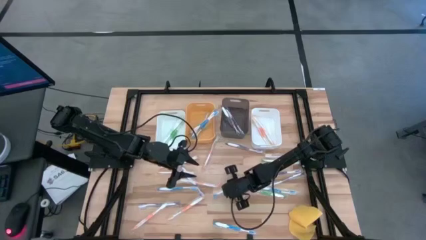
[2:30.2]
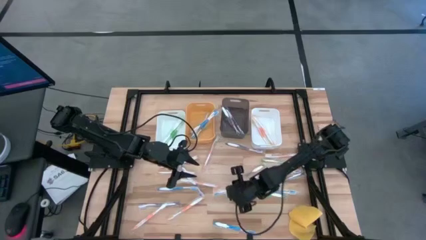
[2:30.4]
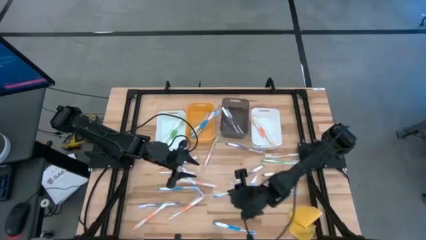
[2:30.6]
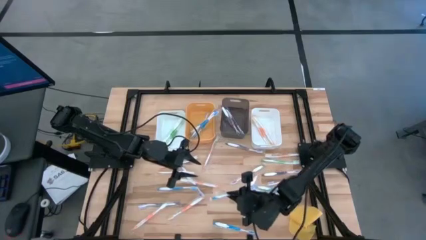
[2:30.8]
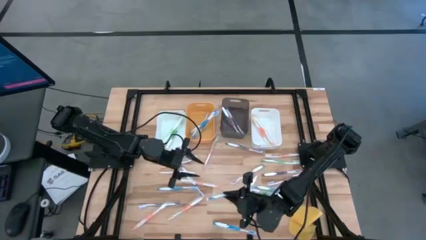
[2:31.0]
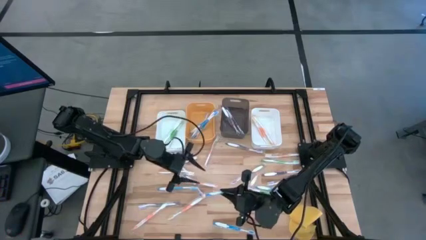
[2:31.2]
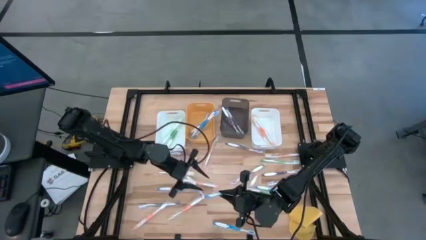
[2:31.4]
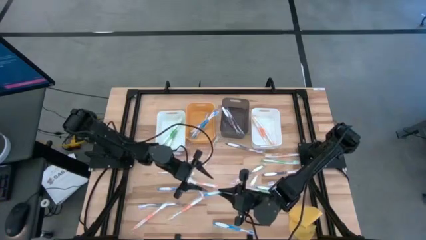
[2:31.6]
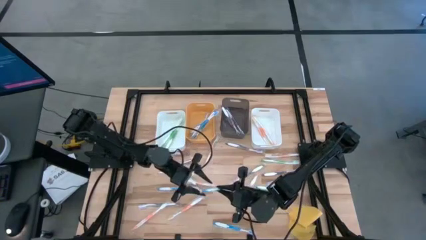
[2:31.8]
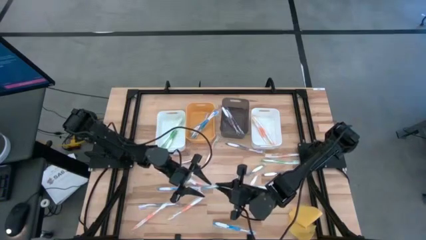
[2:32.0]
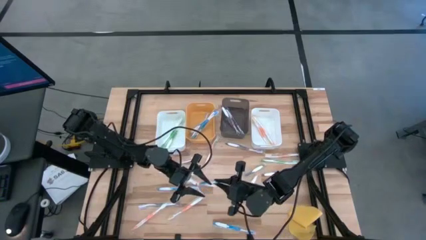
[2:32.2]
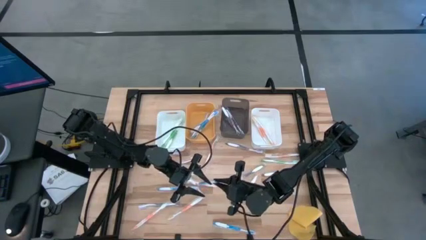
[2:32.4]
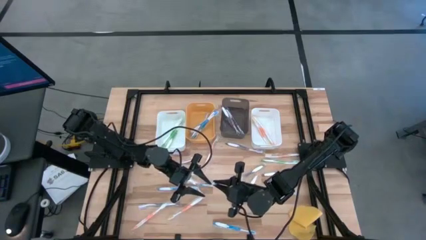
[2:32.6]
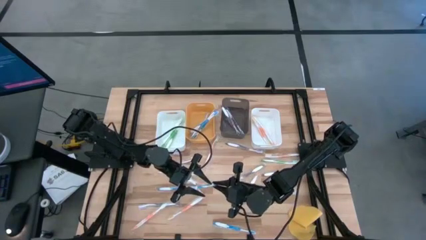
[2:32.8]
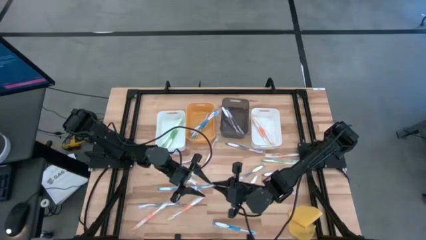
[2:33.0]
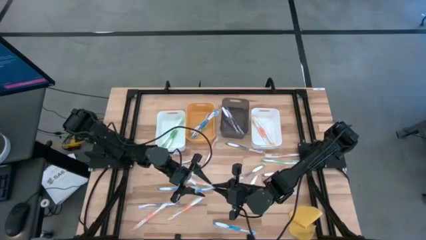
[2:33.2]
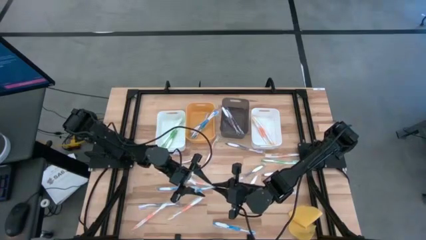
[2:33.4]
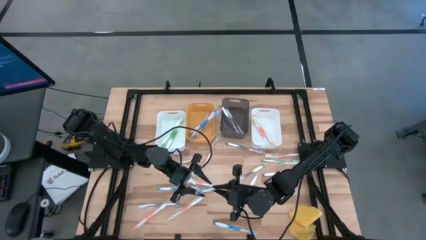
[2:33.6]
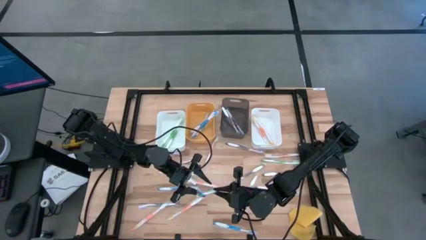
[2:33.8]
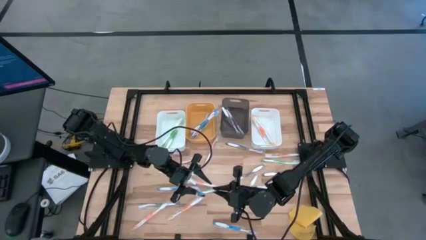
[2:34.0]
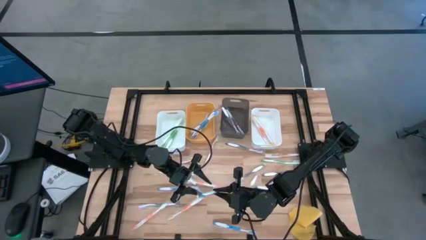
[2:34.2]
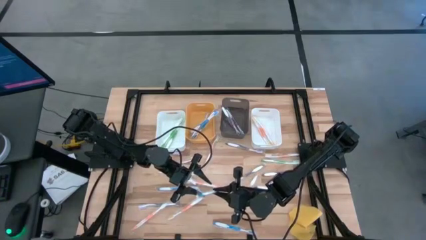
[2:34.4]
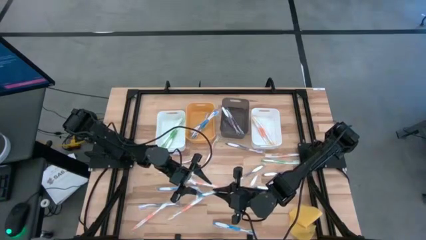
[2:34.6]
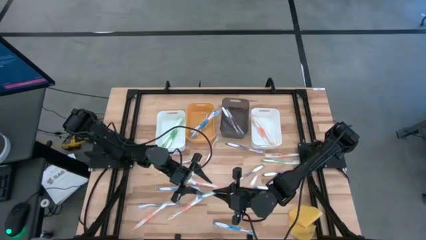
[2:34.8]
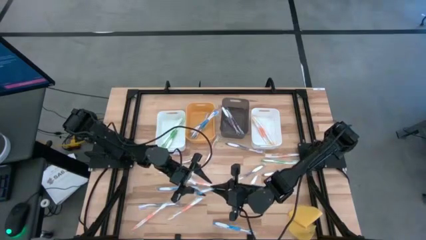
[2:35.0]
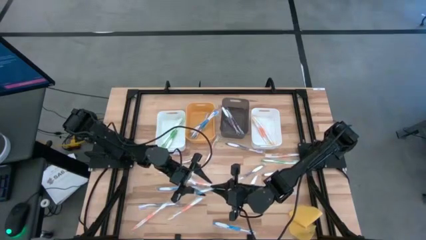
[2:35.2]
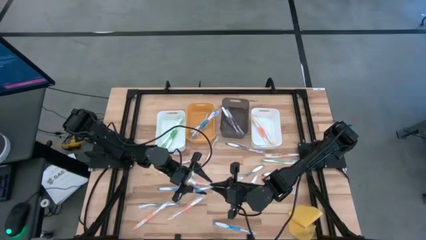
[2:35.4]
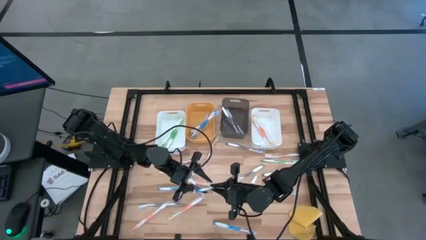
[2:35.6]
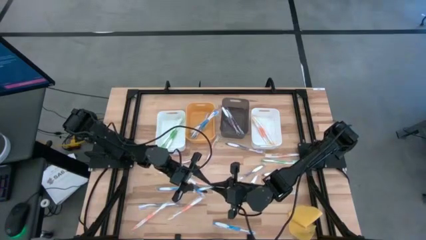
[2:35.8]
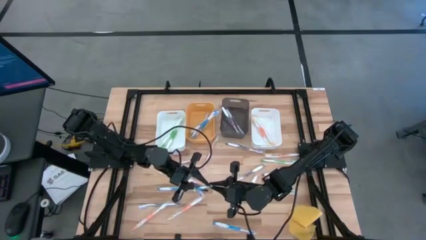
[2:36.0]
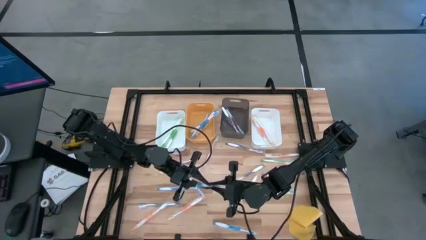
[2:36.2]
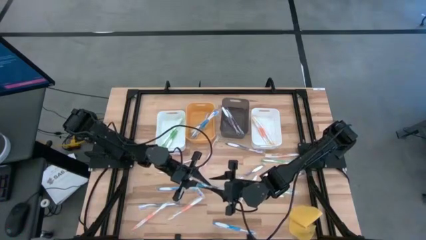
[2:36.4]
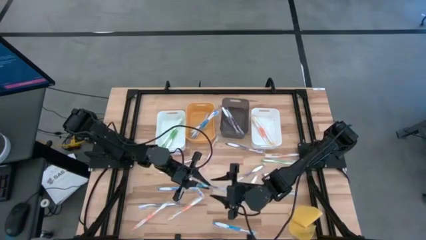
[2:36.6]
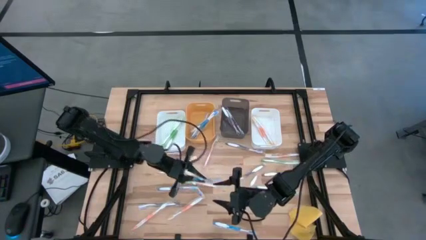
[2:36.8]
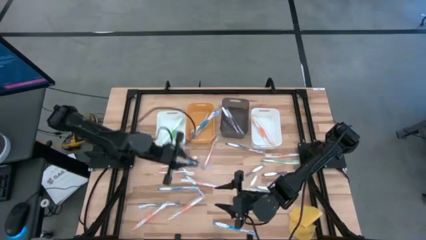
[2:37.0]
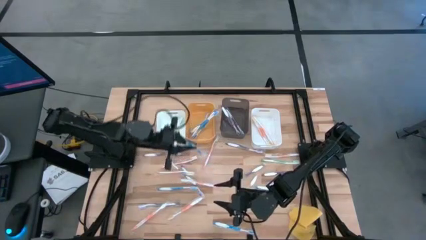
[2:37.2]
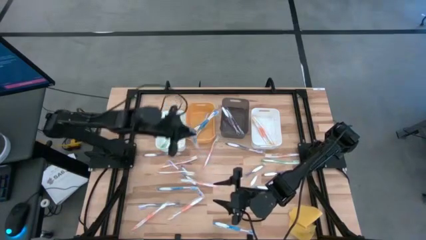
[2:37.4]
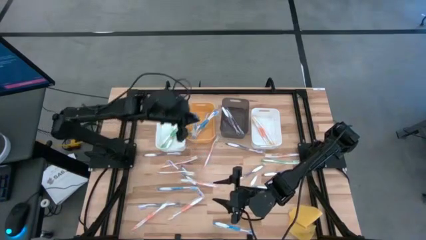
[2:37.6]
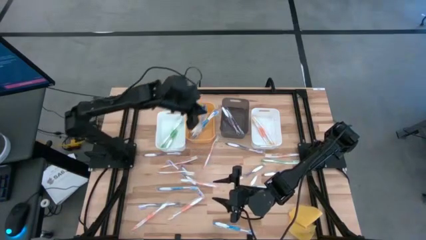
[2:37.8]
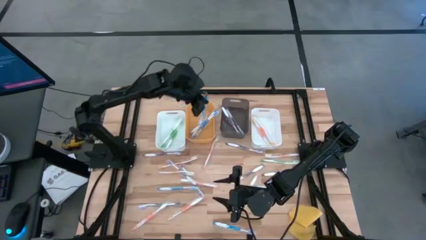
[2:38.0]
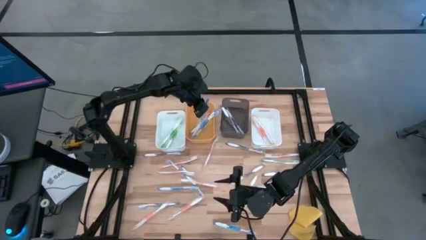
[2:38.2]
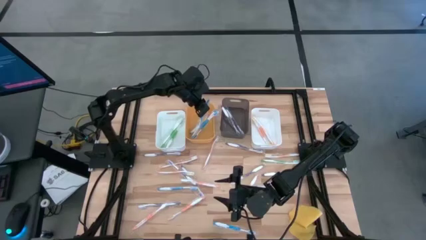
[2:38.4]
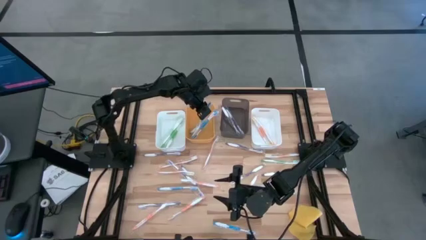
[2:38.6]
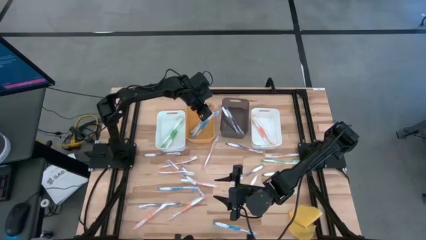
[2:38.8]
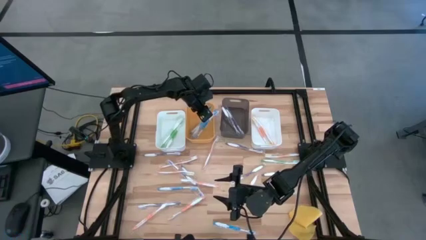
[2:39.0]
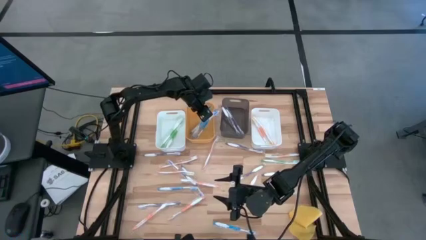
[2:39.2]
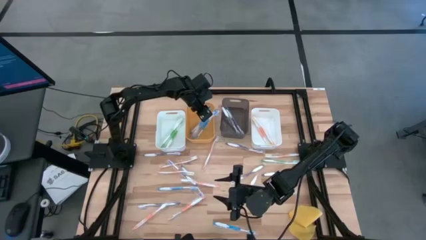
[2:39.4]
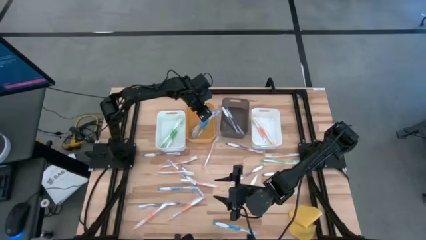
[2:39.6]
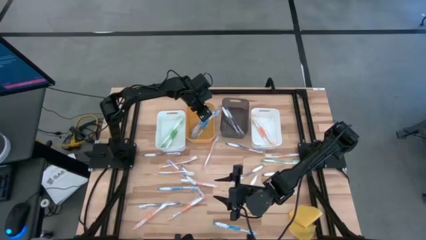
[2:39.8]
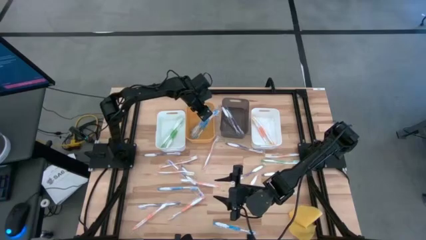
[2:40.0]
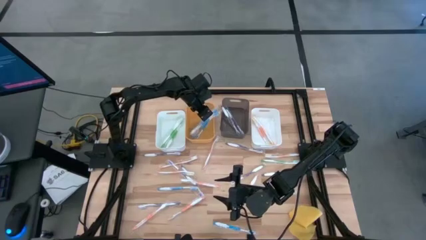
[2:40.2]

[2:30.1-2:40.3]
Task: Pick & Place Toothbrushes
Put the blue toothbrush into the orange bin

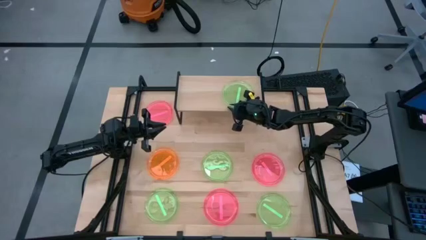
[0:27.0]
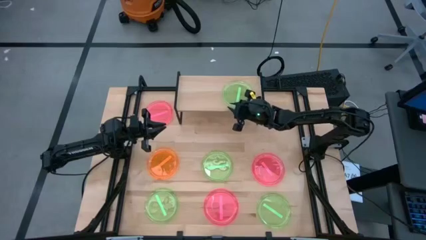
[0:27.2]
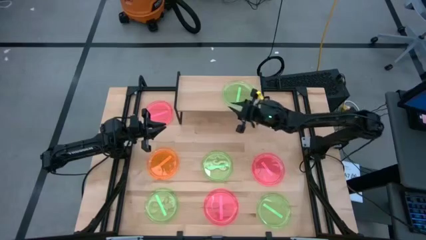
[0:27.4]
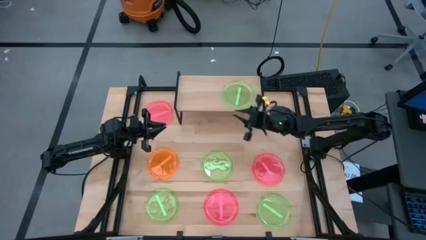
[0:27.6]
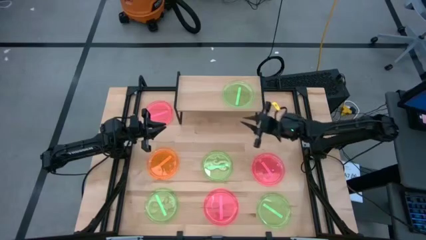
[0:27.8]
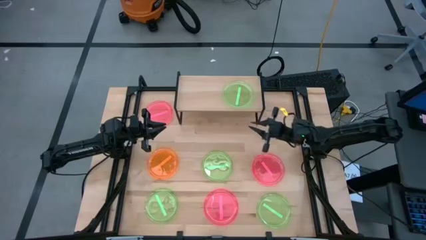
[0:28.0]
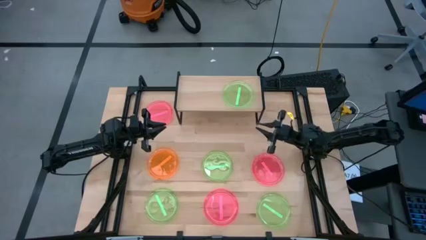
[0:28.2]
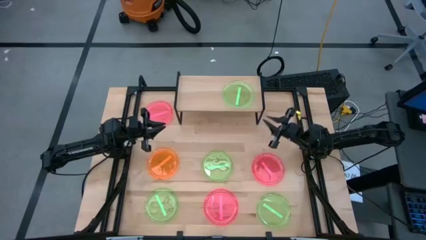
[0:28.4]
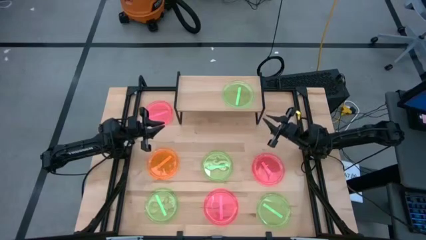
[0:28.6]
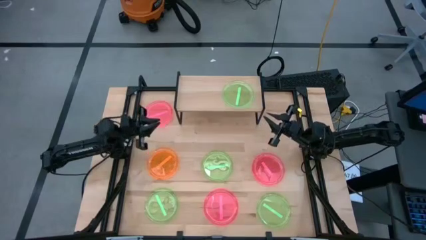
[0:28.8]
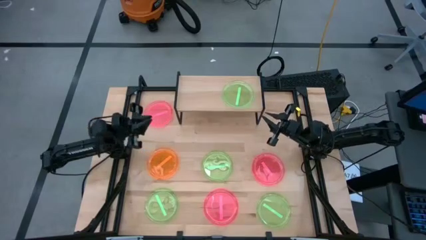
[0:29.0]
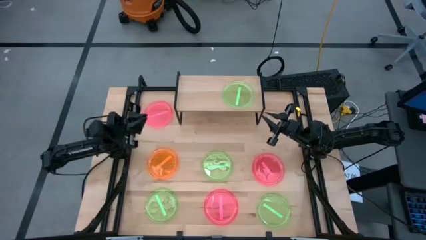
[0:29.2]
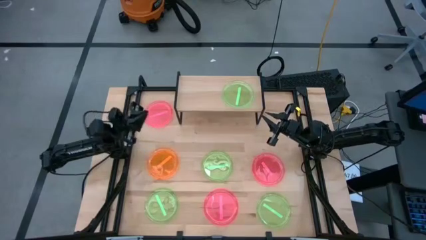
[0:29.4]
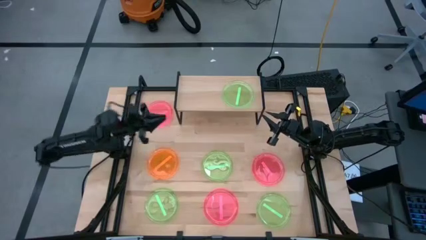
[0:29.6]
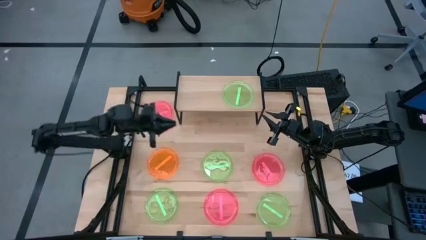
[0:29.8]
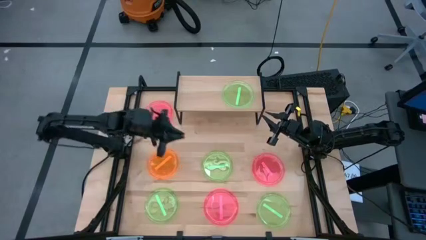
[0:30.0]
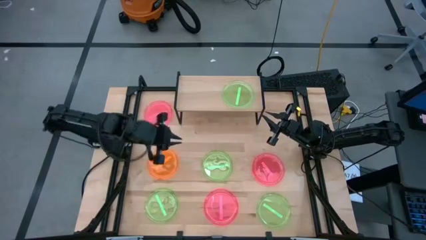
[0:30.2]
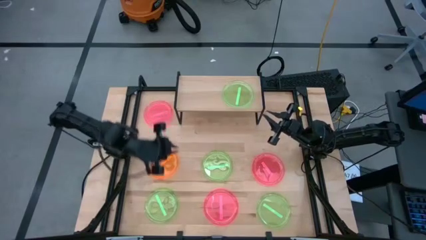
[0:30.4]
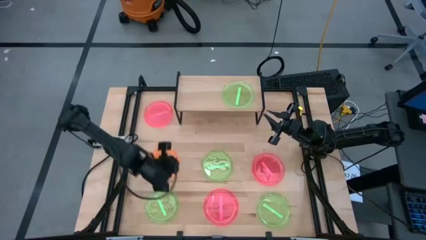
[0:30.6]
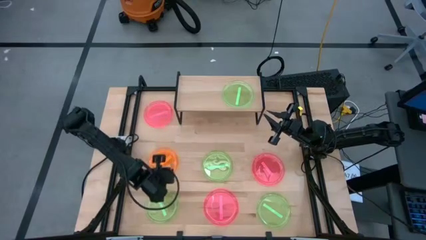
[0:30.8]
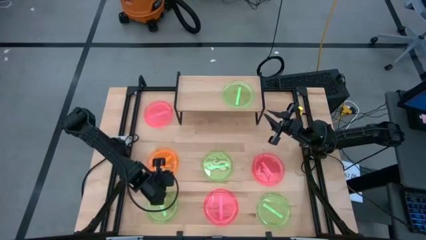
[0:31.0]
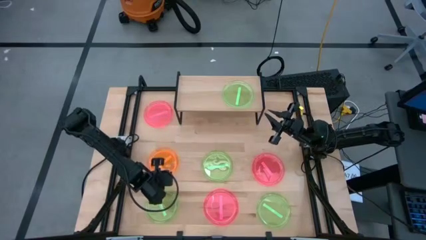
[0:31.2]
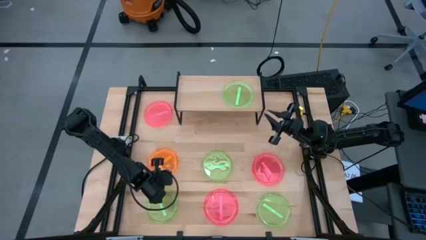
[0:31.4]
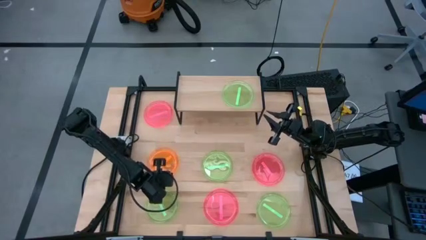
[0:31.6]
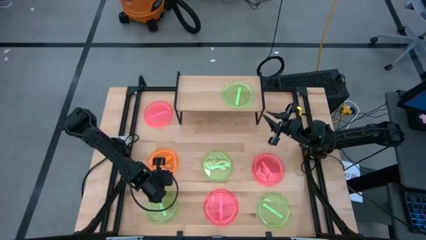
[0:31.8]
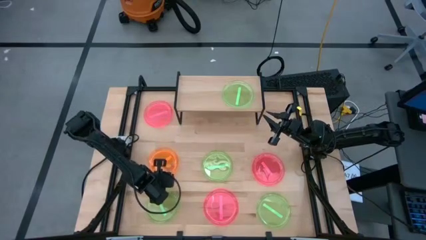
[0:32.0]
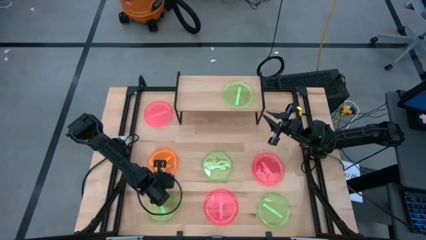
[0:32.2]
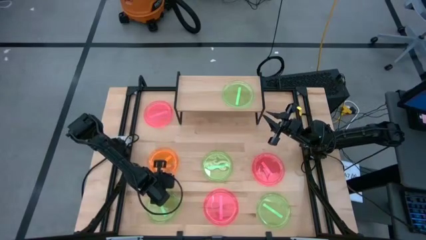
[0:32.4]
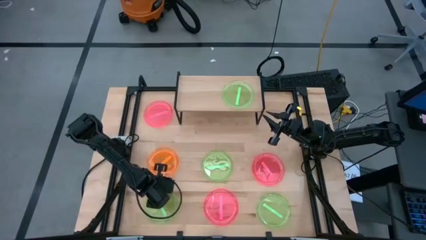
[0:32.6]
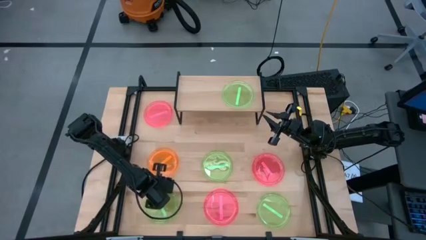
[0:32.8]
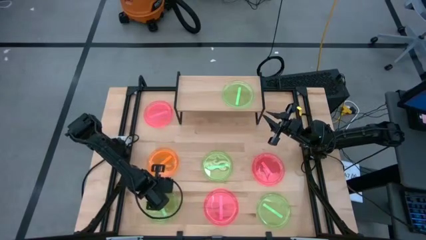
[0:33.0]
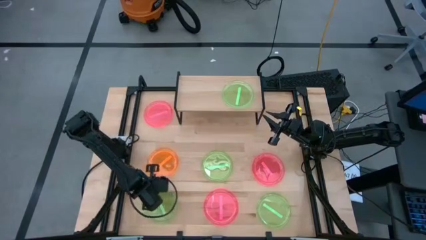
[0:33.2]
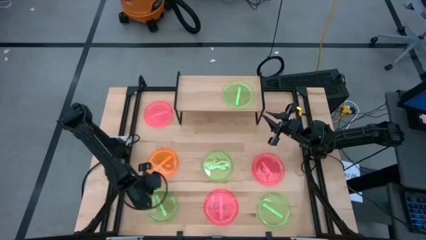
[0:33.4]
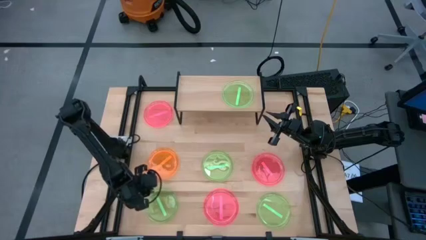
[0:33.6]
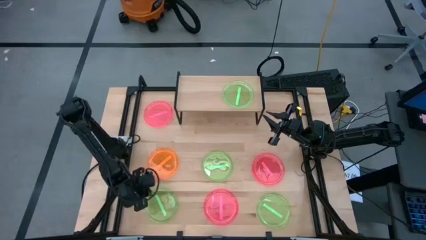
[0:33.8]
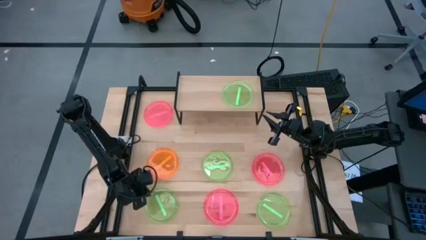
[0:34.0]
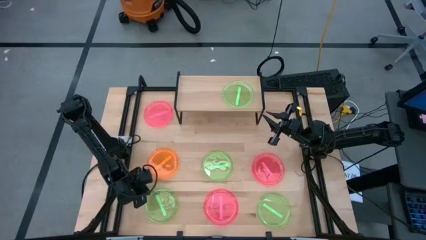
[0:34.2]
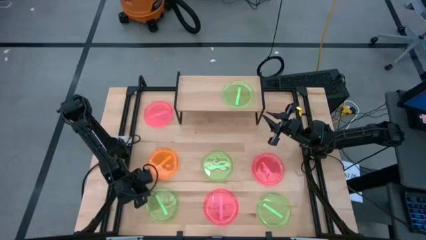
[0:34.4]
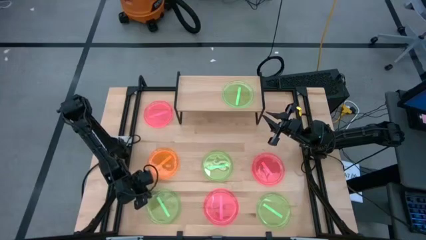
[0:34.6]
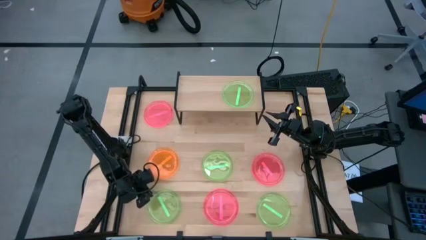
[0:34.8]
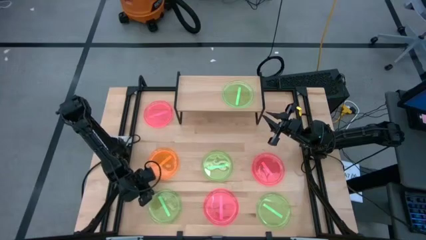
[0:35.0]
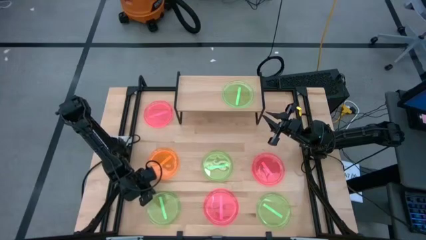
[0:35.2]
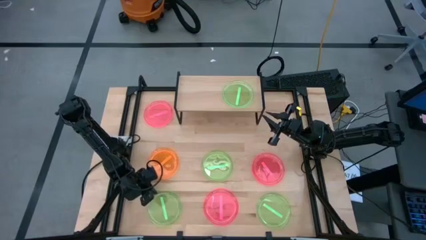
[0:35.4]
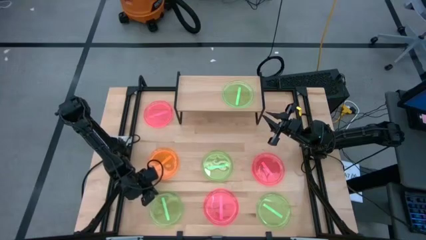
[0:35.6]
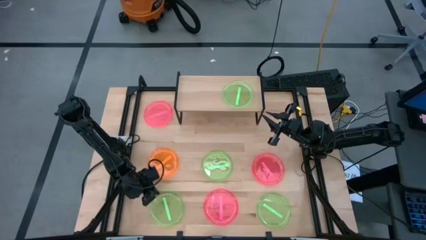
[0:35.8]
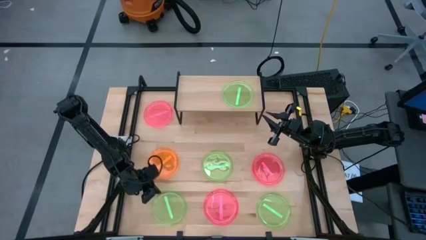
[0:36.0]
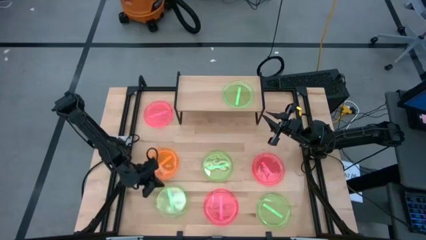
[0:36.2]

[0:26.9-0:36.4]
Task: Place and stack plates onto a shelf
Stack the green plate on top of the green plate on the shelf
